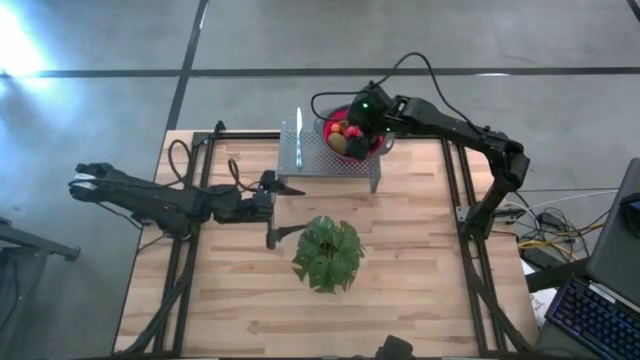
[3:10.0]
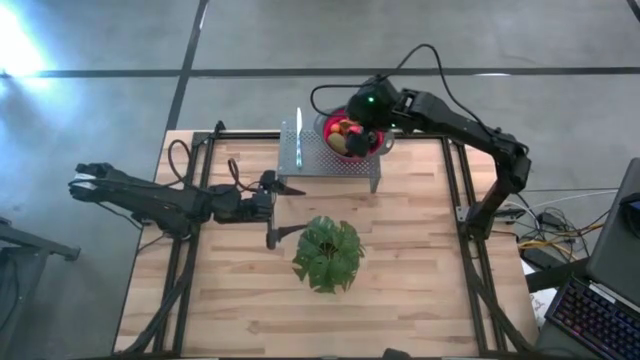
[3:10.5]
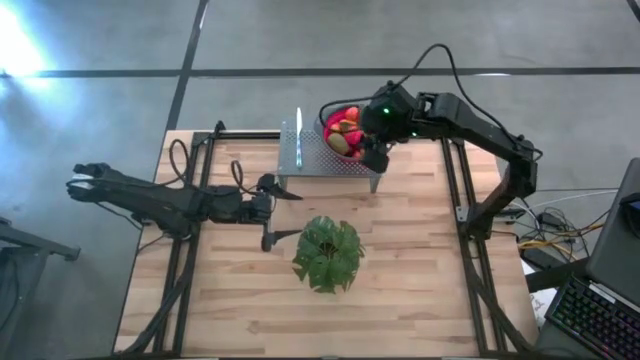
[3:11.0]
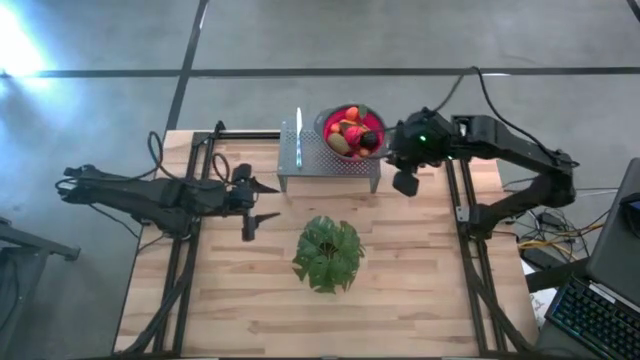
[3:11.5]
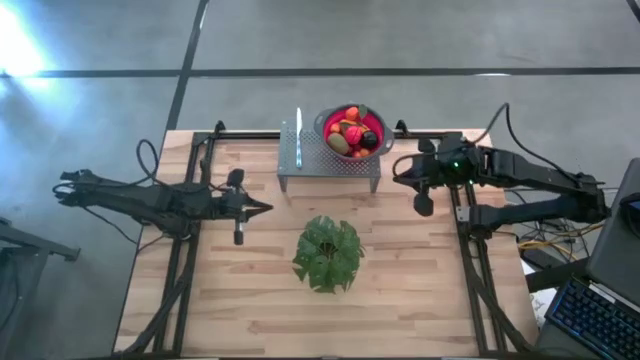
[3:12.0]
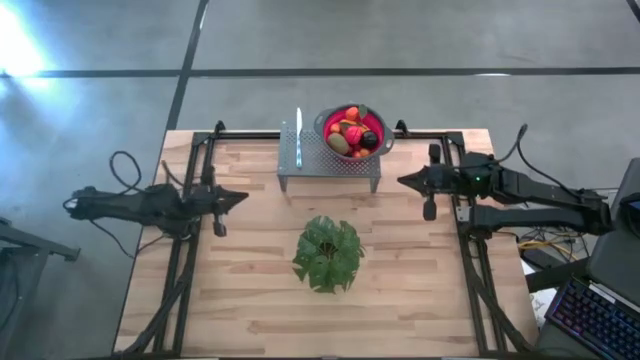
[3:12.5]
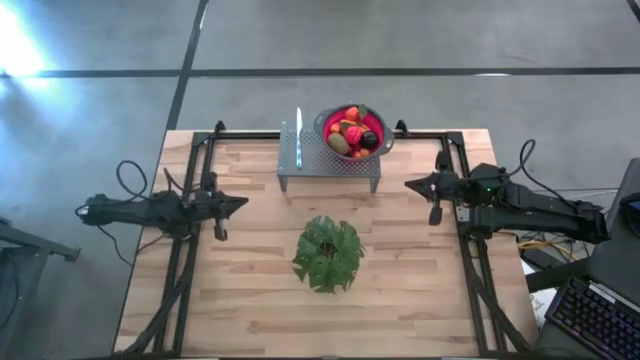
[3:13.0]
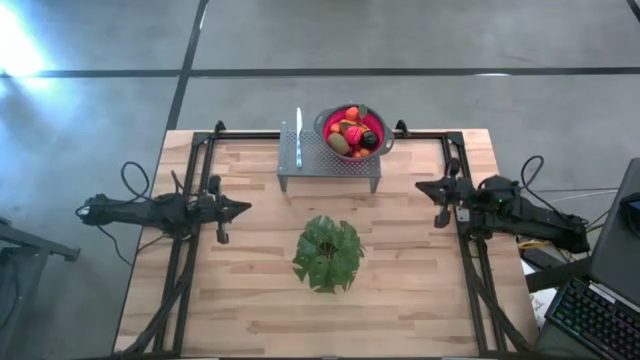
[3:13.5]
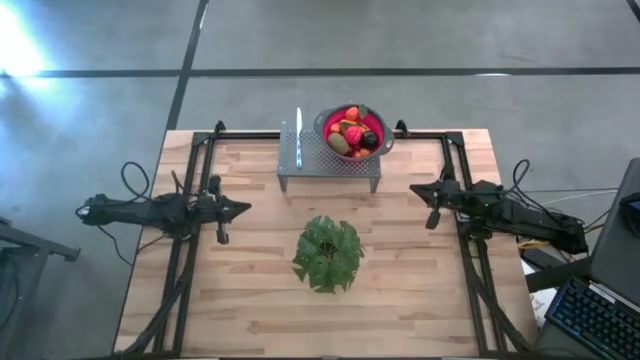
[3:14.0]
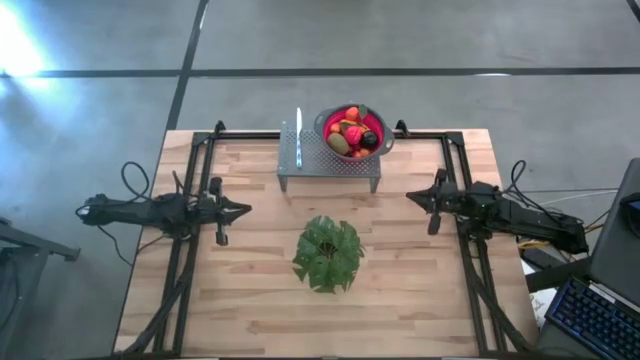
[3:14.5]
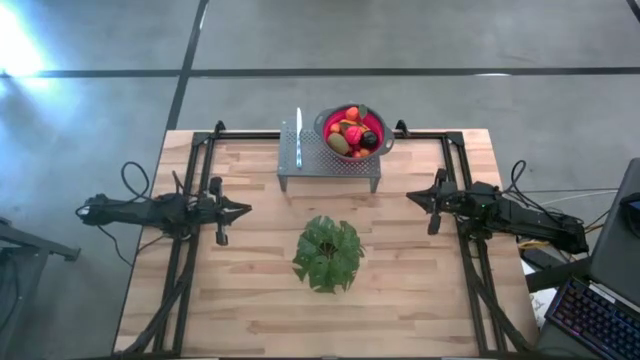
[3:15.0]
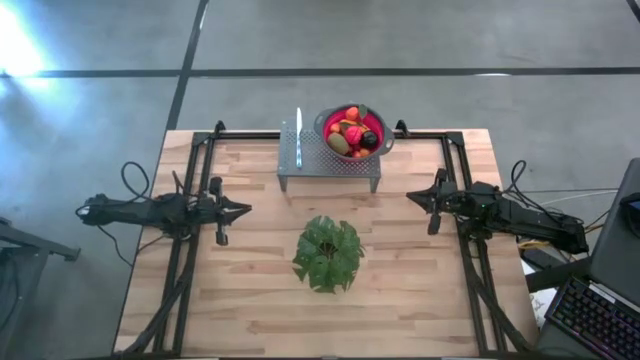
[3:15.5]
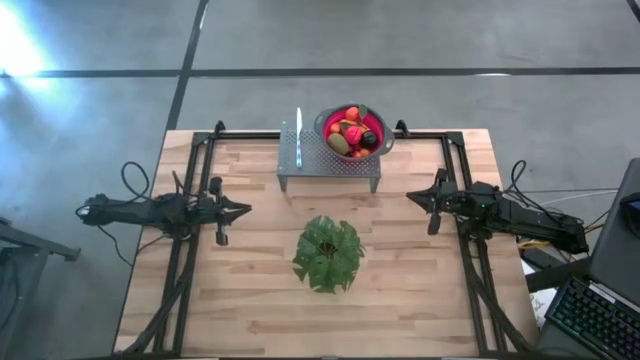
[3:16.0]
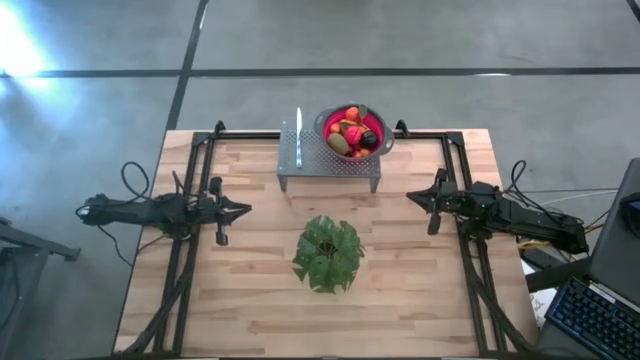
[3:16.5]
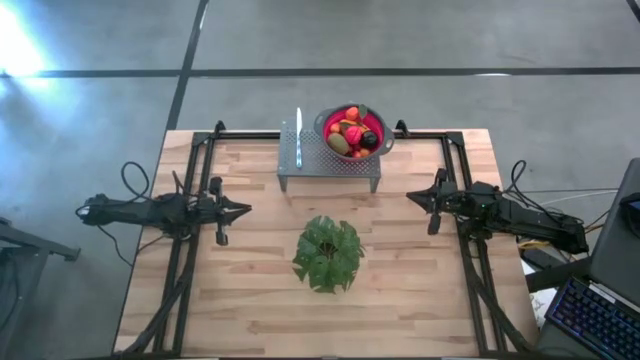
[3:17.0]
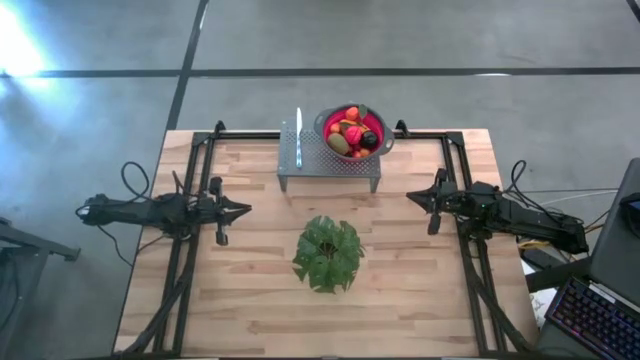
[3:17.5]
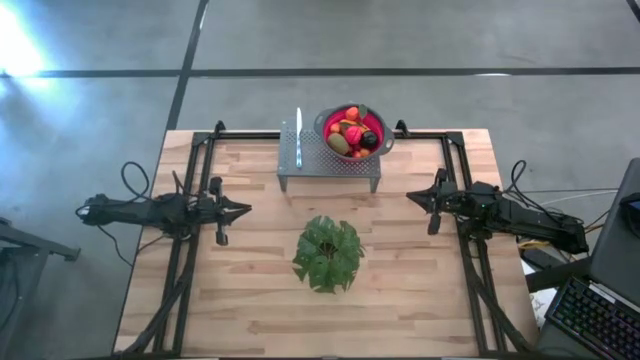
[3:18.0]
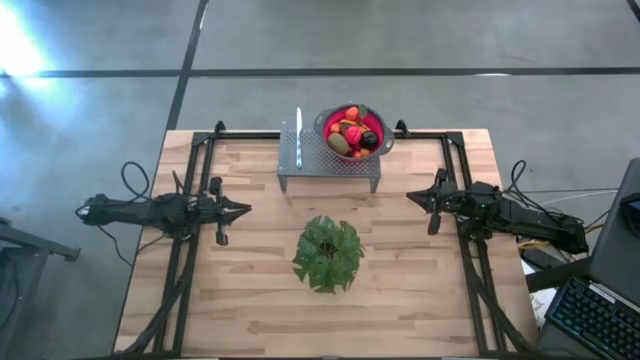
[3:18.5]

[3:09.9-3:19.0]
Task: Pick & Place Fruit
Return to Home Position

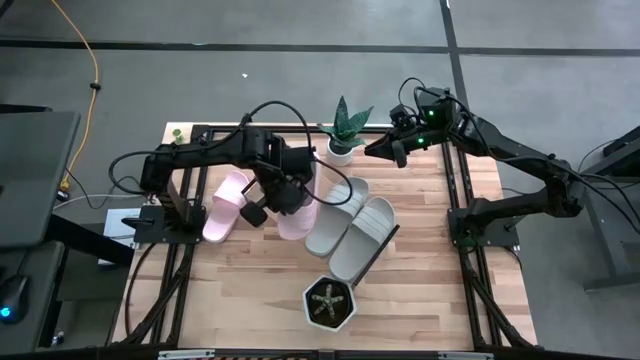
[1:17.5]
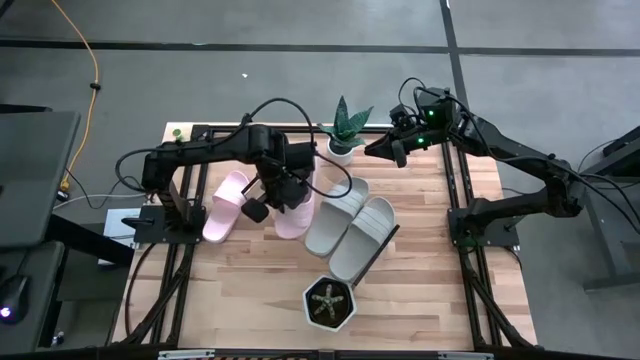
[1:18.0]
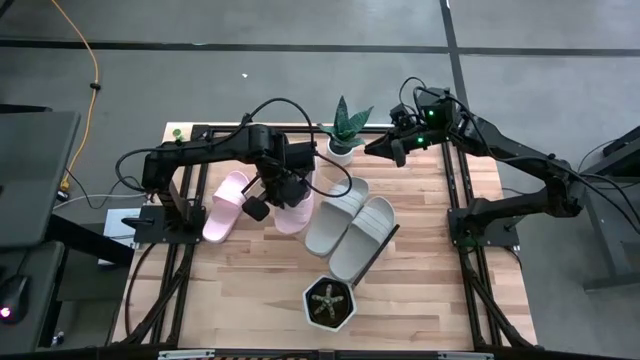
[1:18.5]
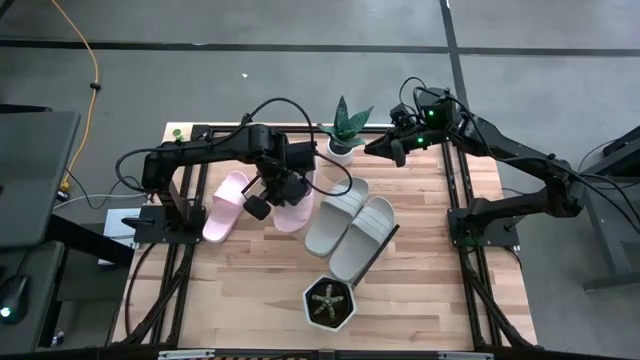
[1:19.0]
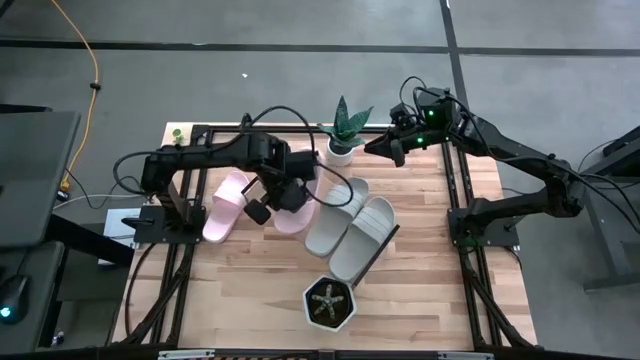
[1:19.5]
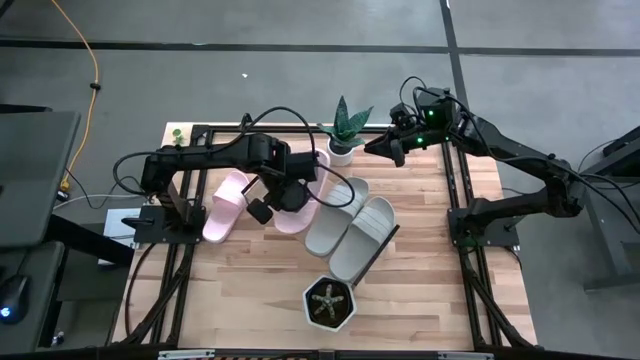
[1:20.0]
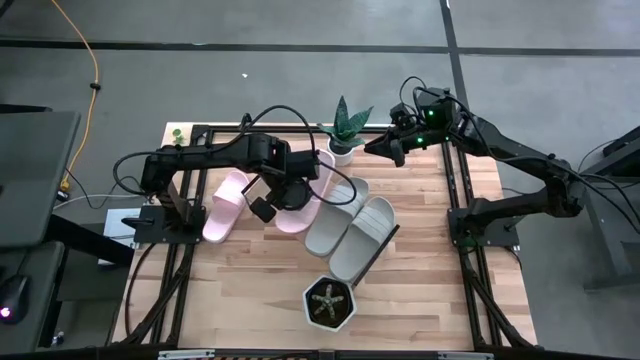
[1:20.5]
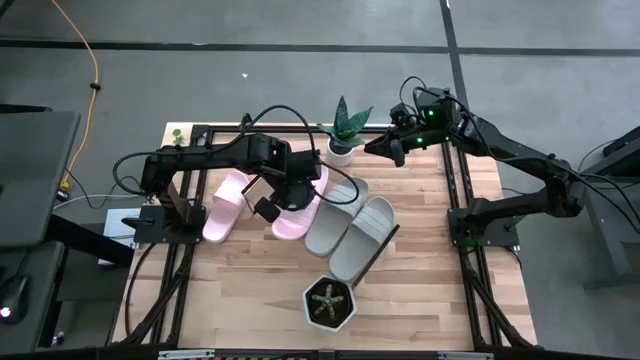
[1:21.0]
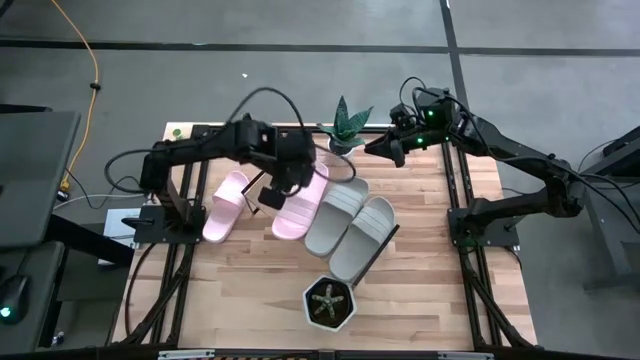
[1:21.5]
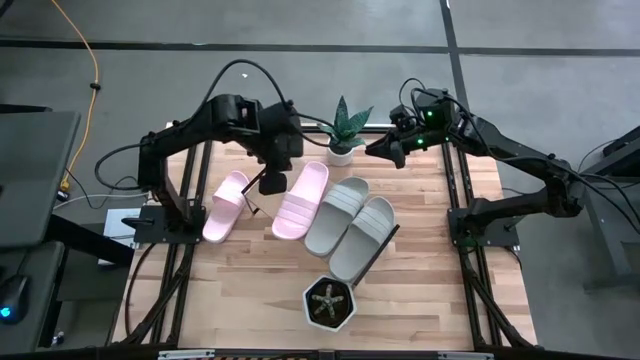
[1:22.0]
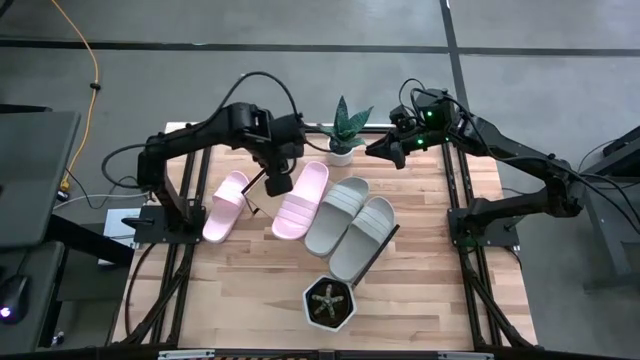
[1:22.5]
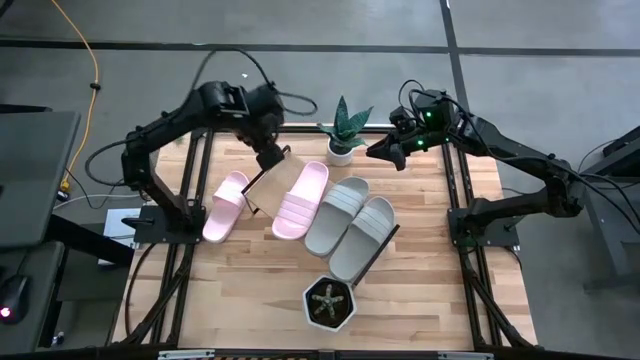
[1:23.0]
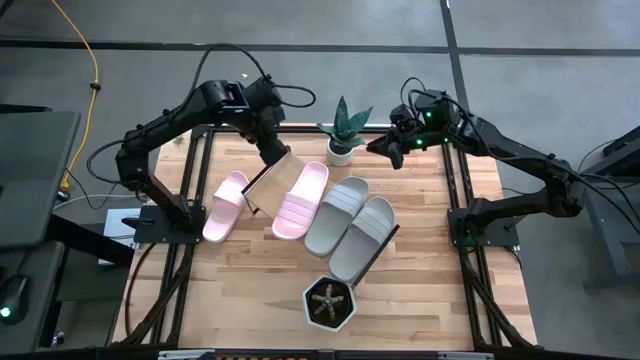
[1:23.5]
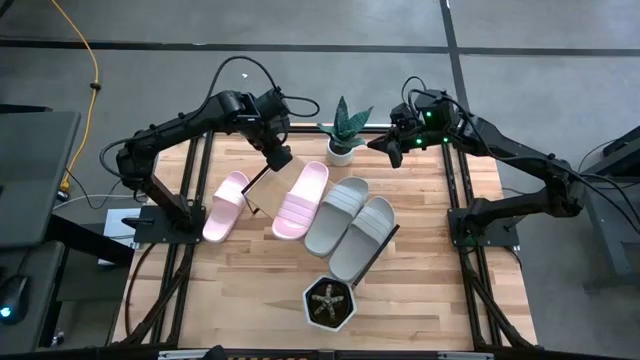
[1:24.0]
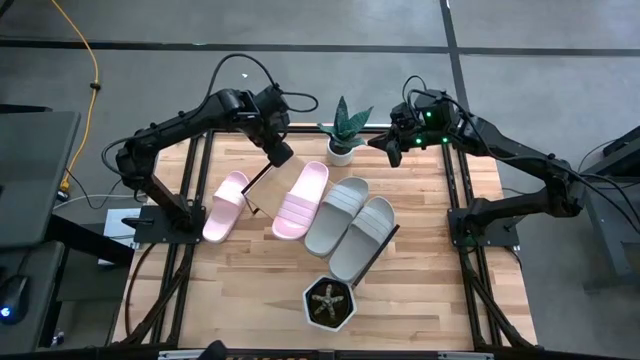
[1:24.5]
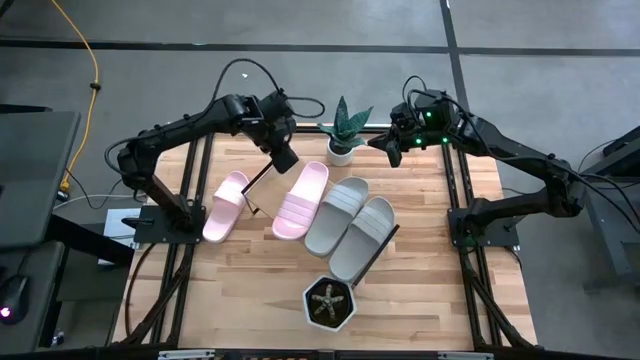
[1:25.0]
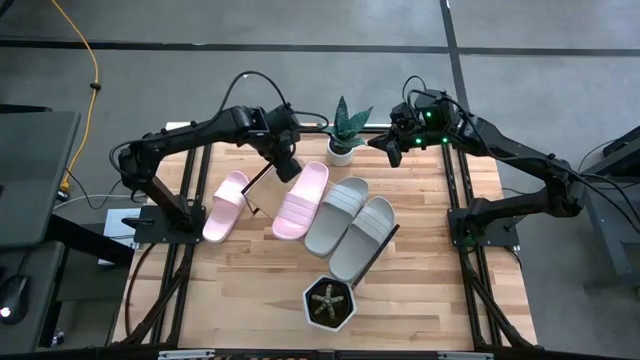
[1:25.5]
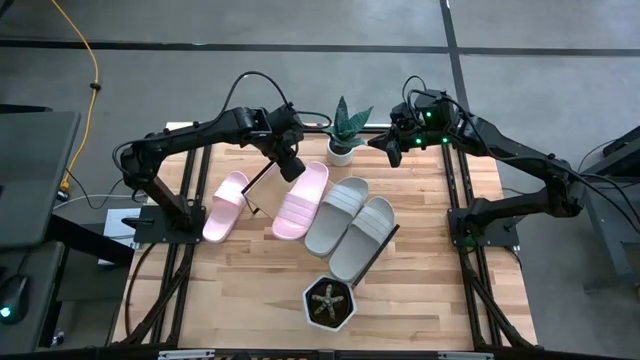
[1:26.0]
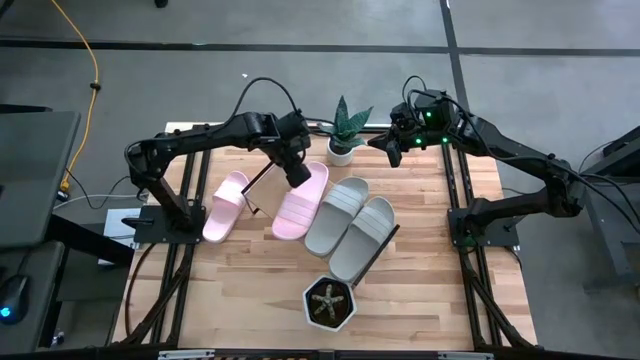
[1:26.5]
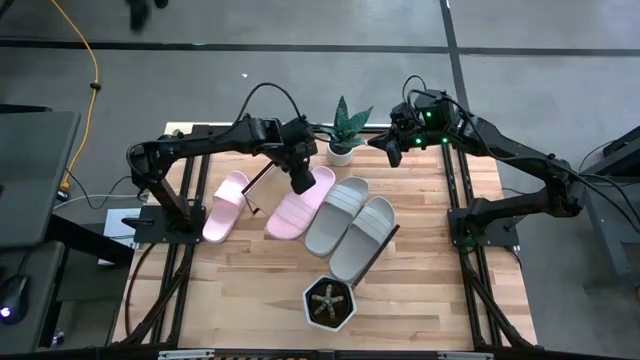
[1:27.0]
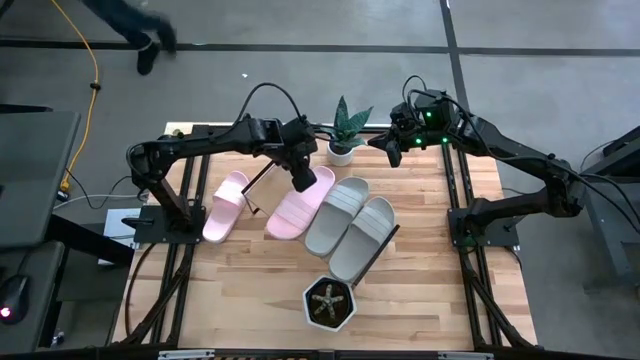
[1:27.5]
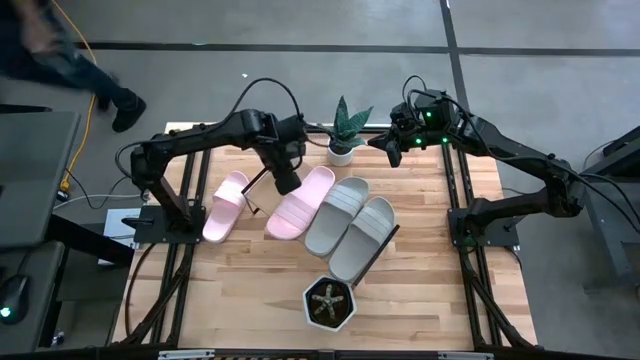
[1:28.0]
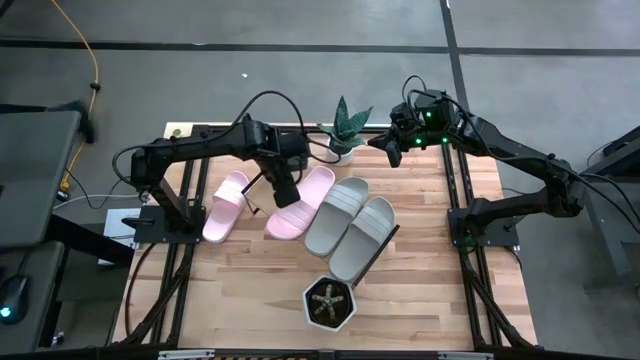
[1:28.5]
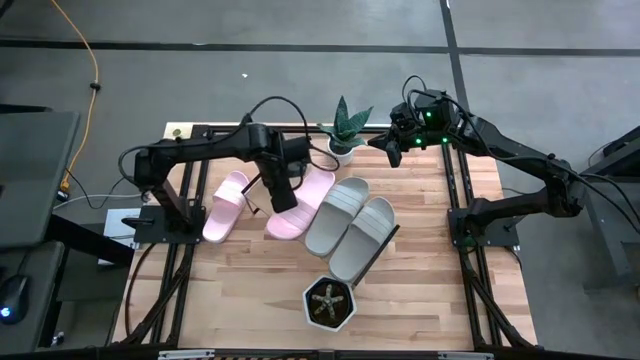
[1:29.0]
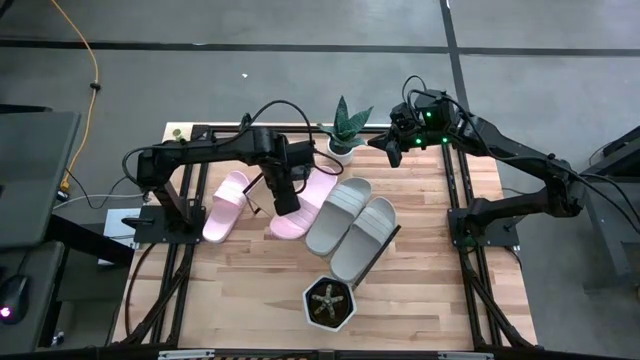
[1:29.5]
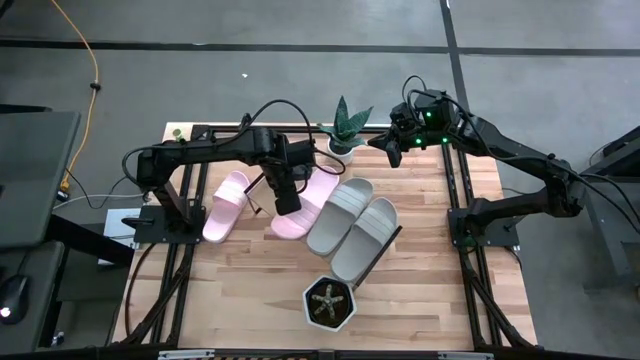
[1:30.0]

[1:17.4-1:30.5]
Task: Pick and place slides into the shelf
Put the bottom pink slipper on the shelf
